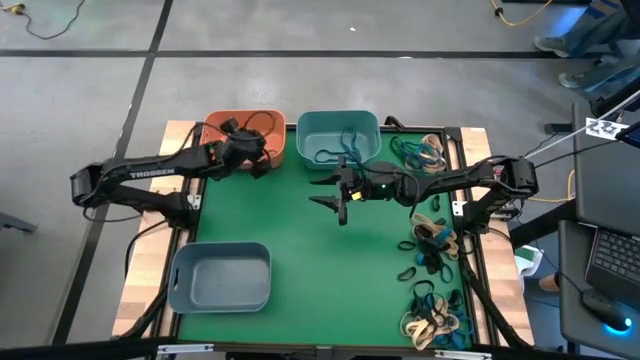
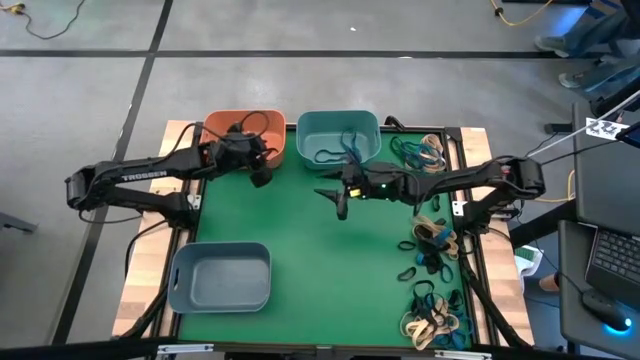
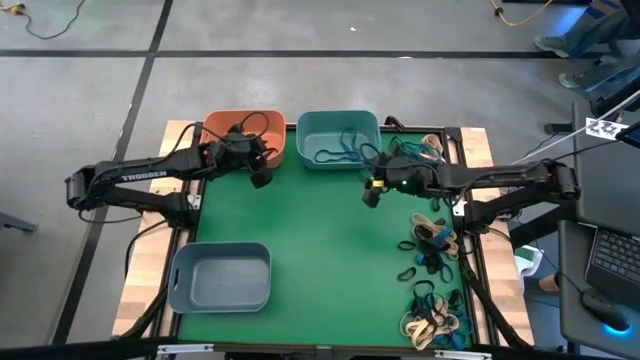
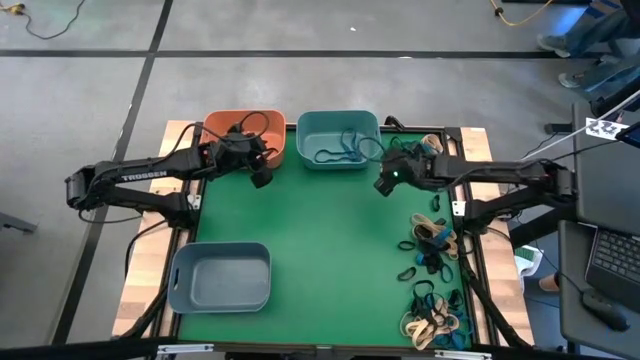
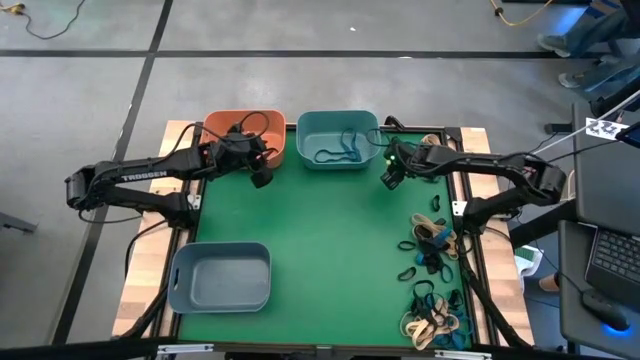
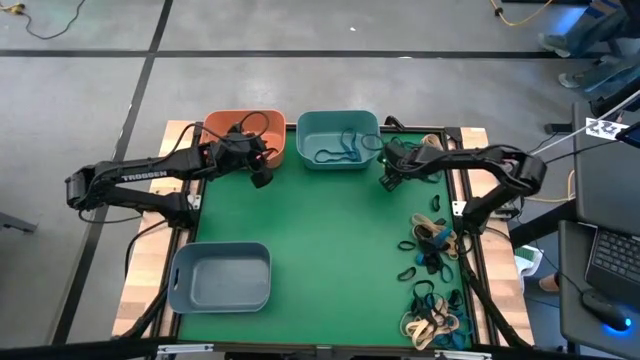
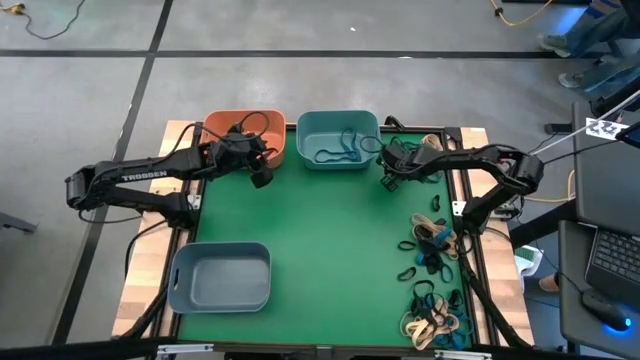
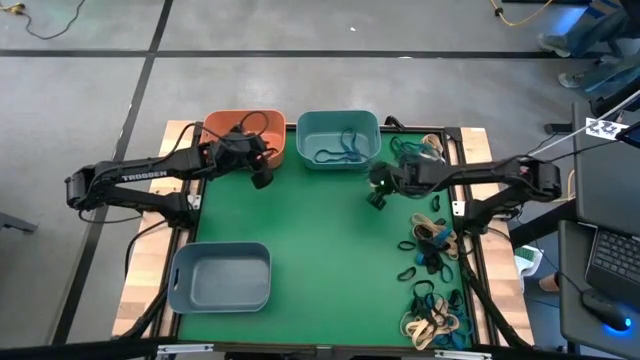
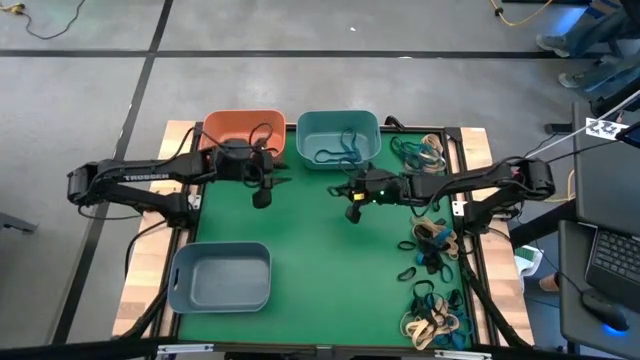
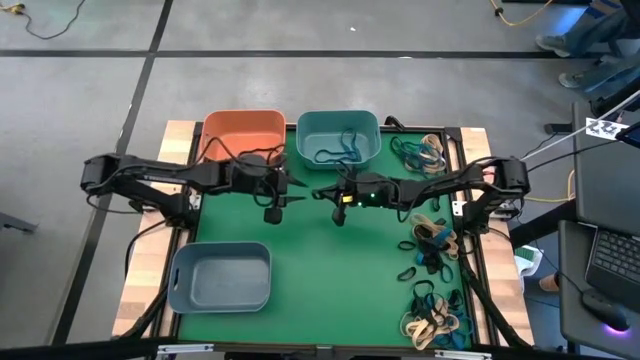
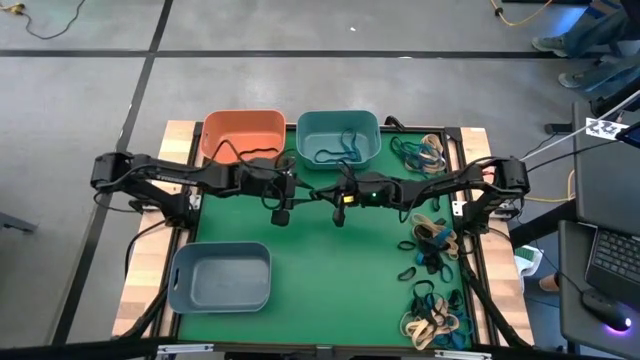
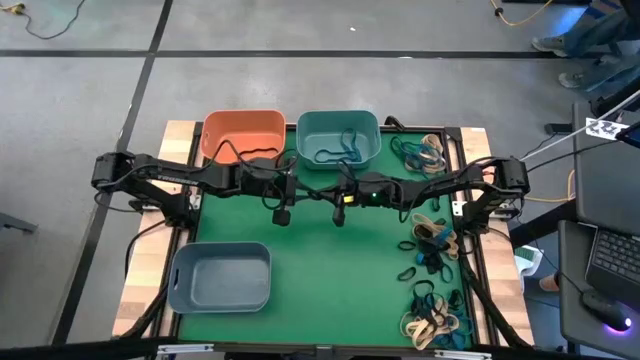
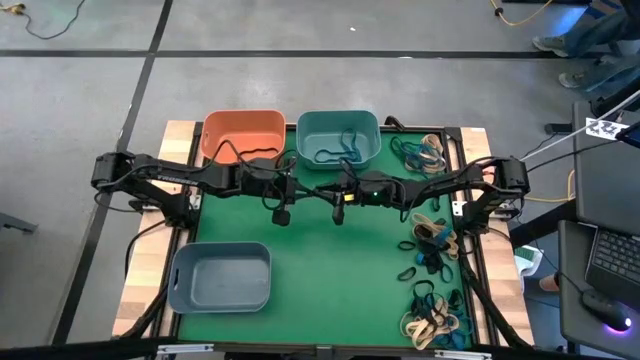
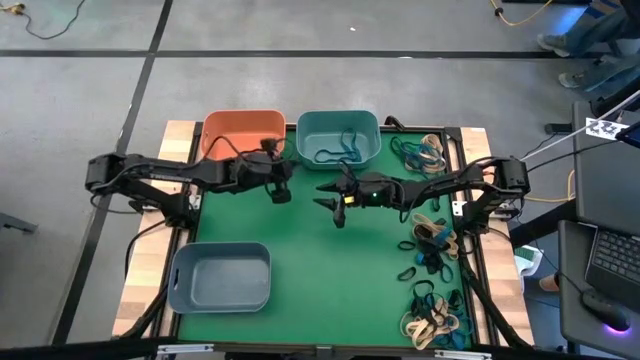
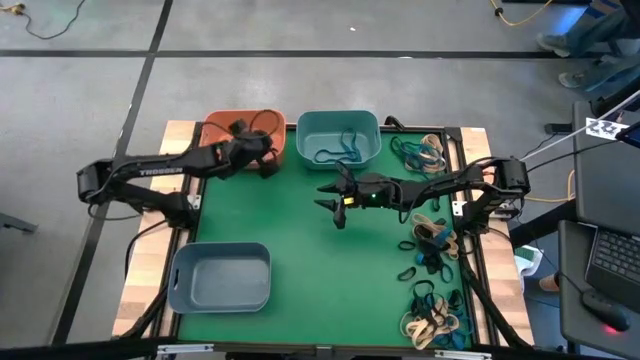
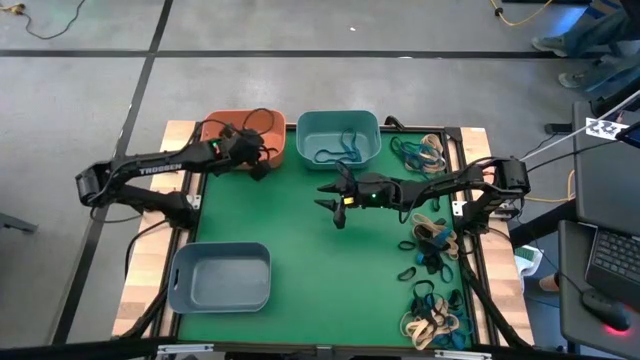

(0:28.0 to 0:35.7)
Task: Sort rubber bands into baskets
Put the black rubber band into the orange bin

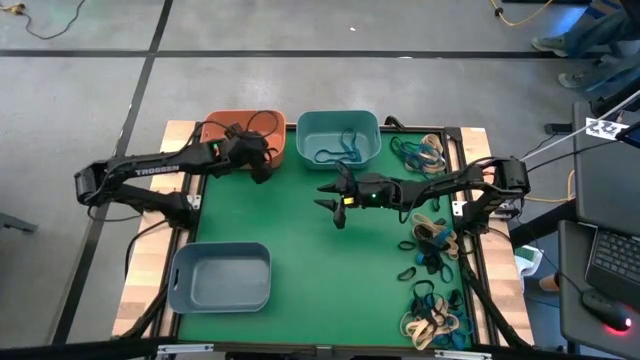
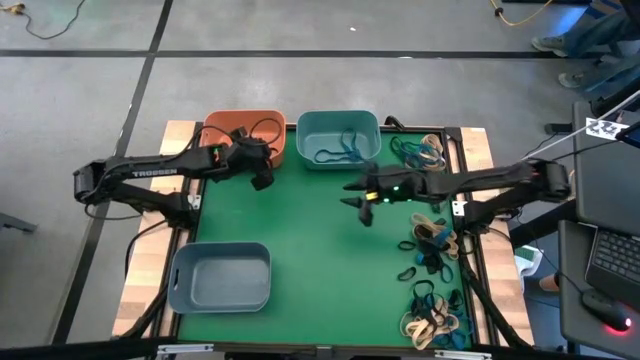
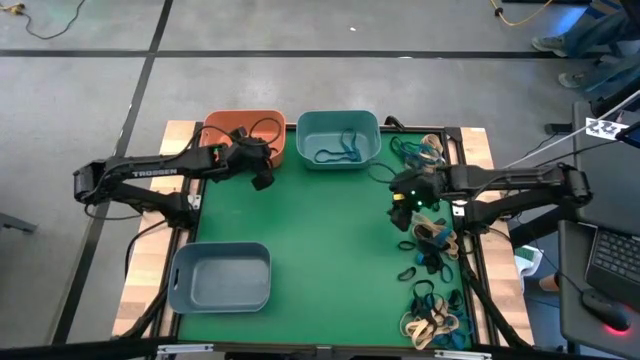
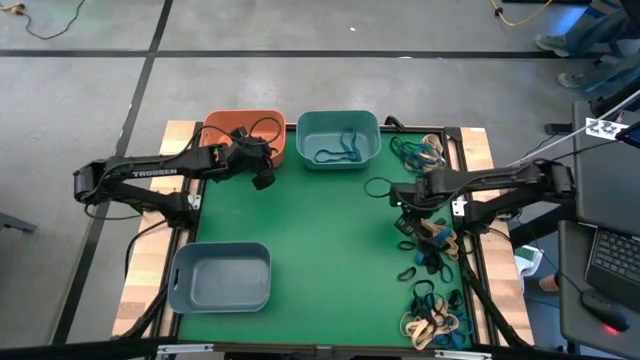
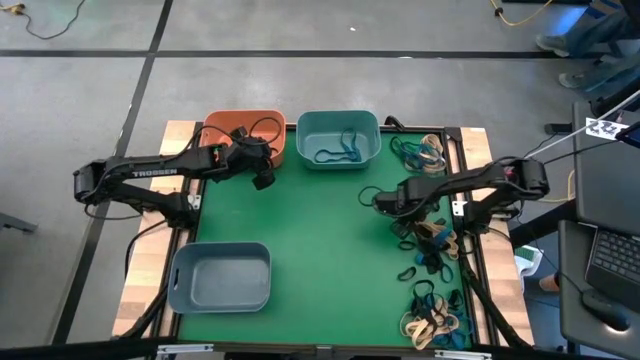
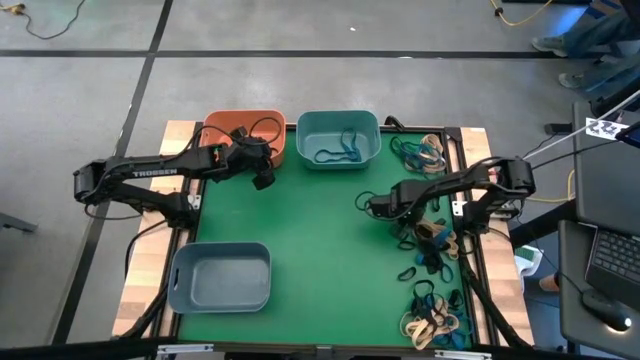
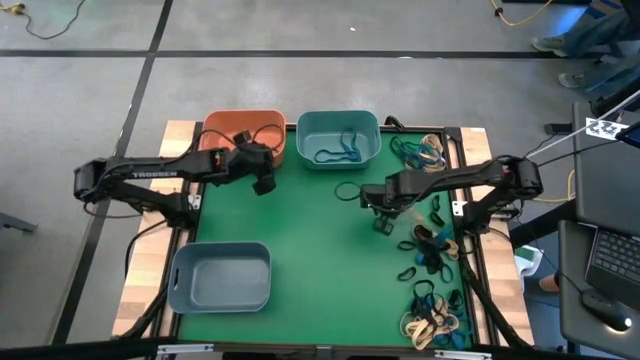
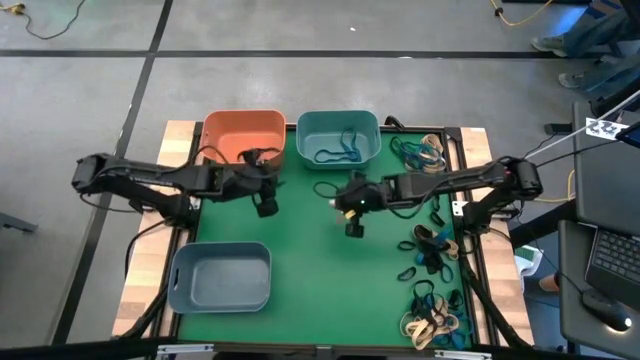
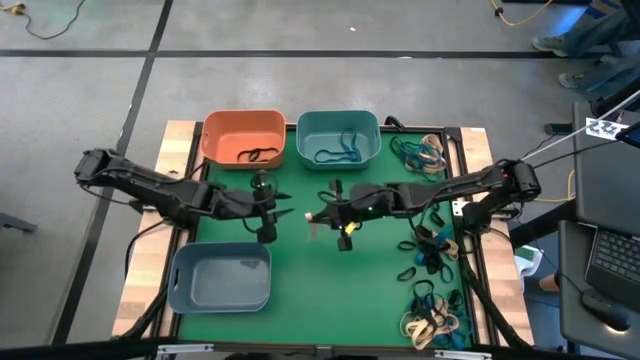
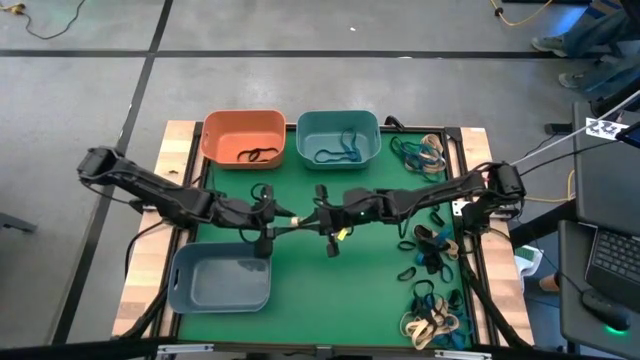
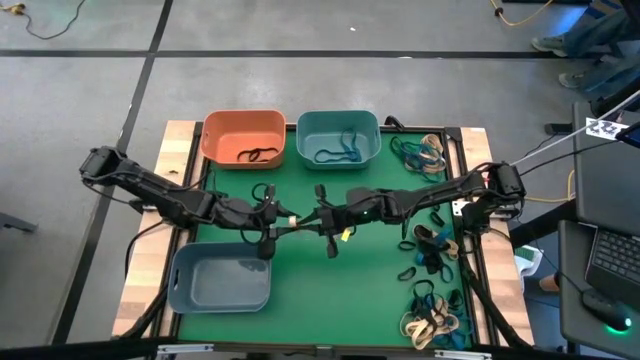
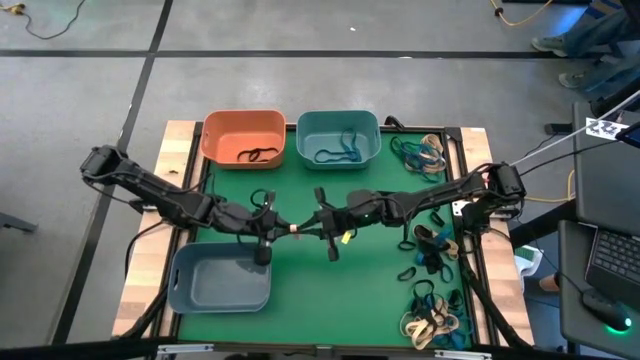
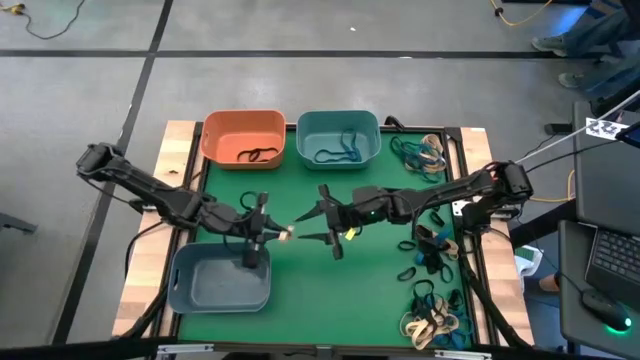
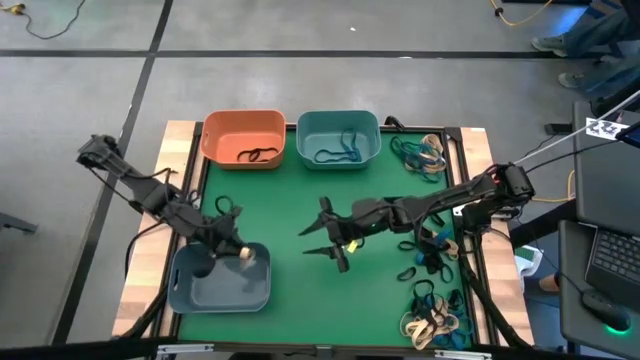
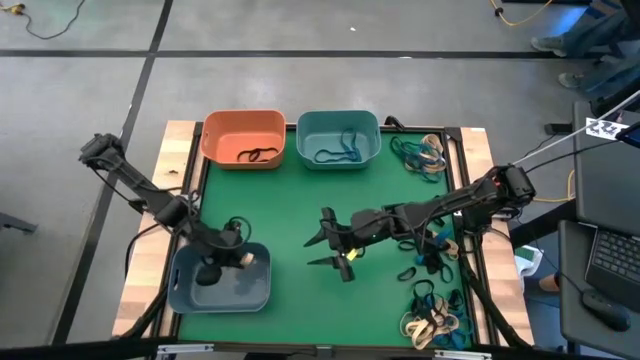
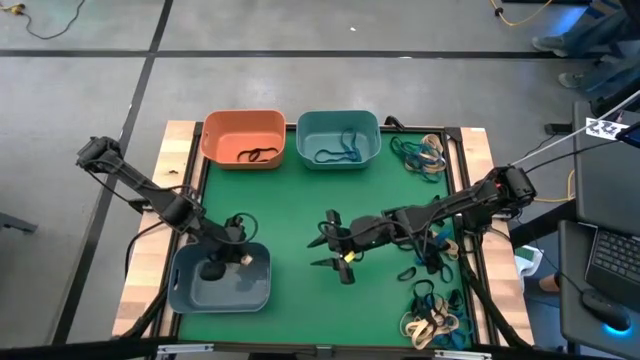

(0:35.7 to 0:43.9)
Put the white rubber band into the blue bin

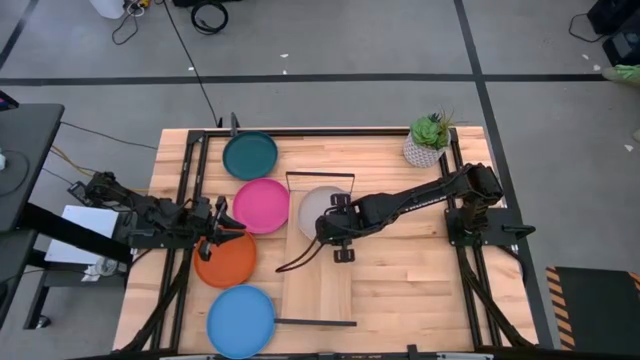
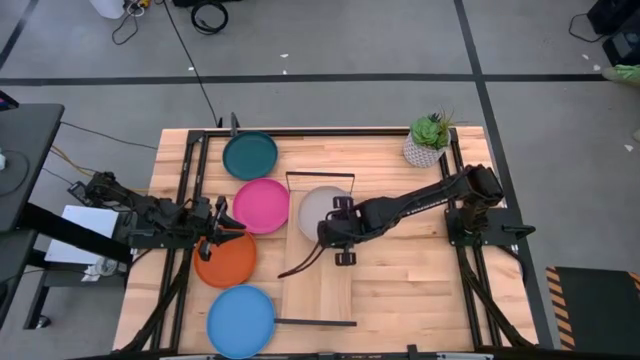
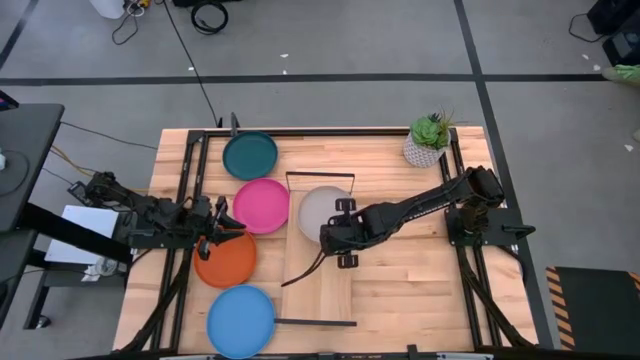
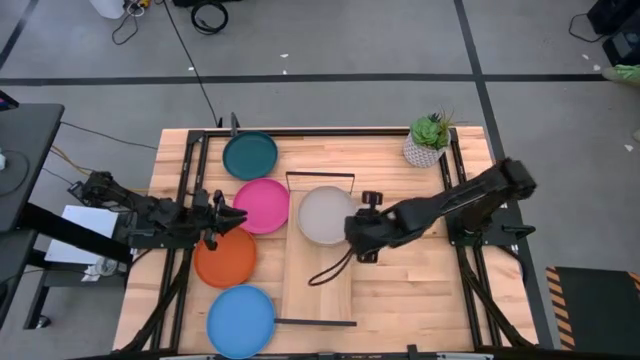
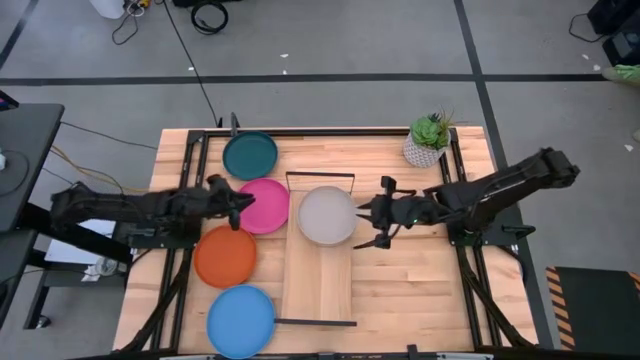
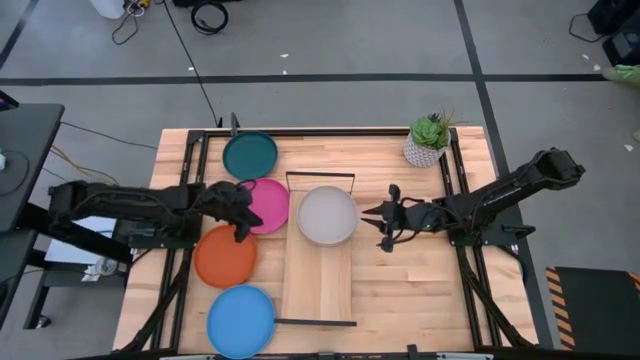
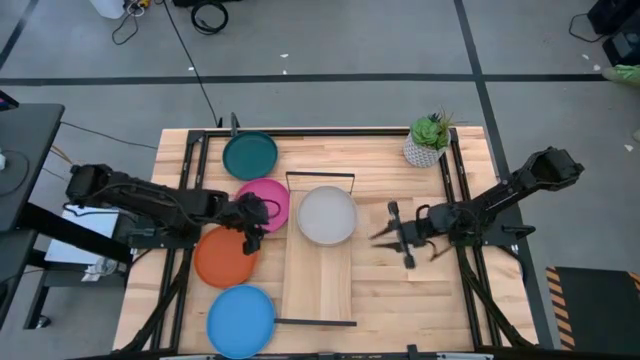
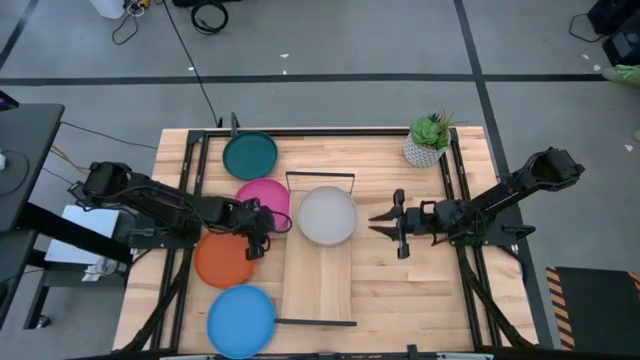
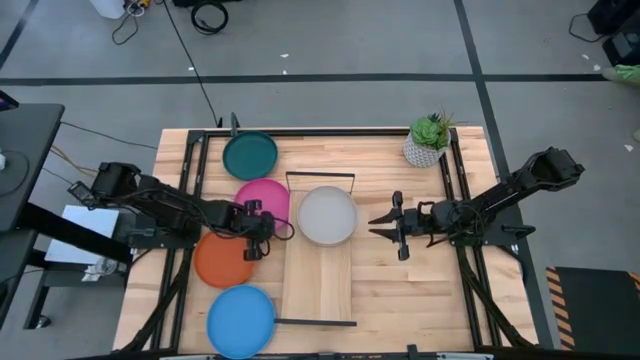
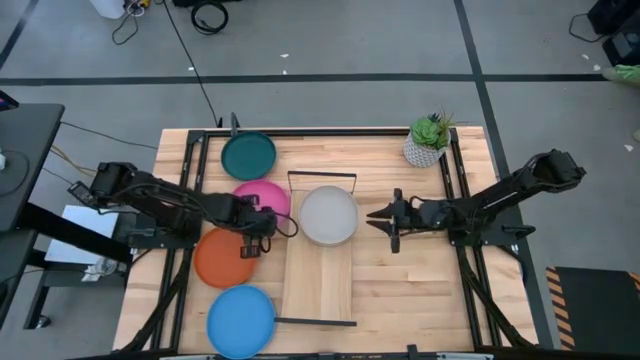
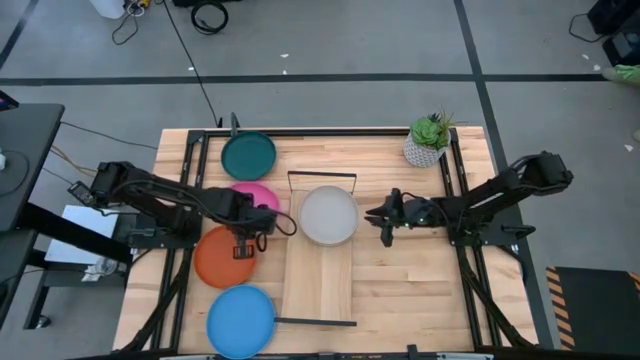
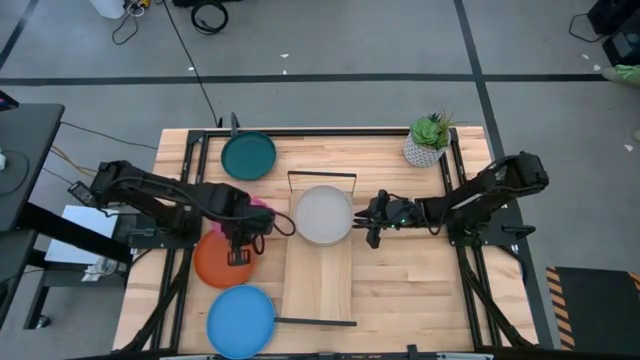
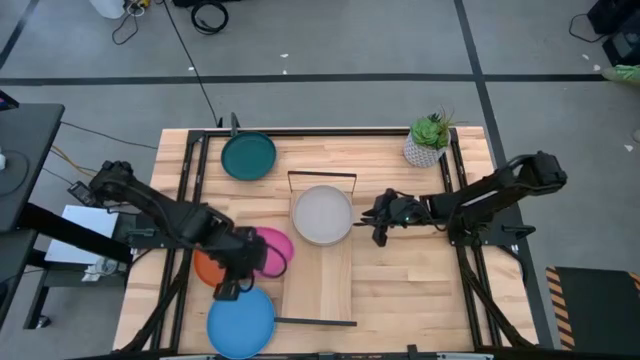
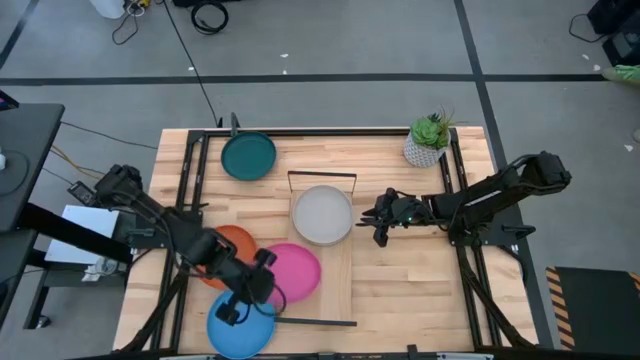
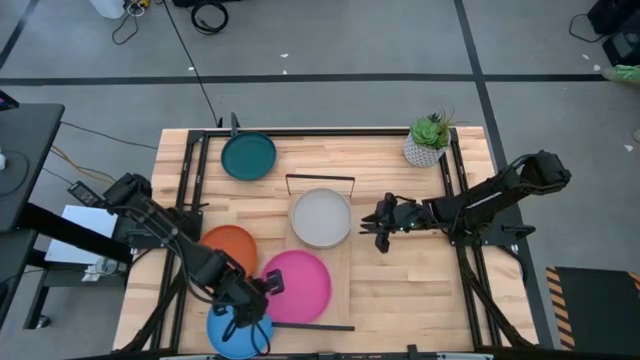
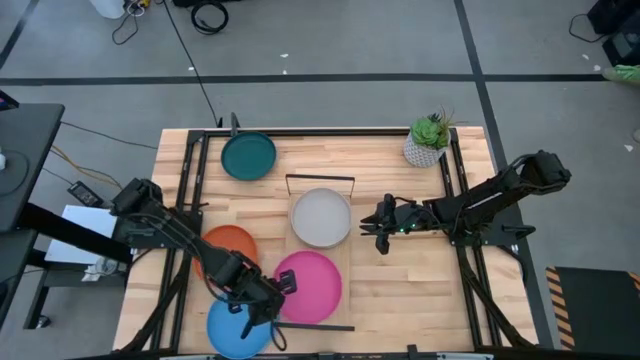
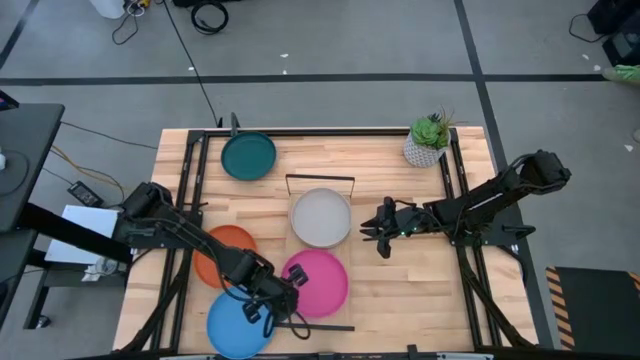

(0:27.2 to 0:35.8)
Task: Place and stack plates onto a shelf
Put the pink plate on the shelf
